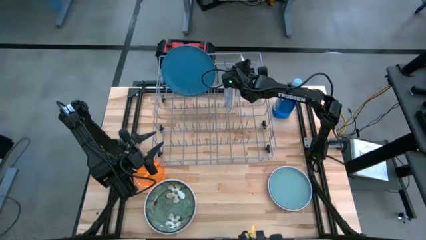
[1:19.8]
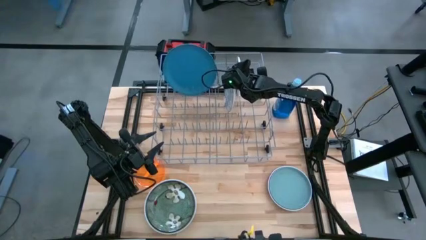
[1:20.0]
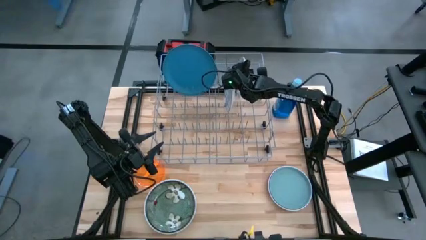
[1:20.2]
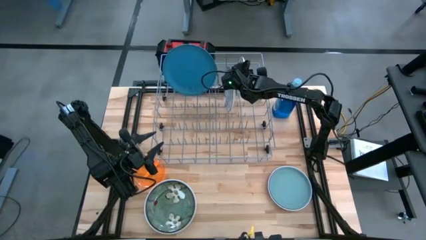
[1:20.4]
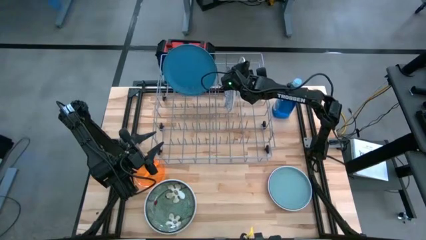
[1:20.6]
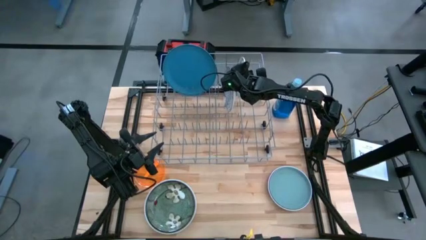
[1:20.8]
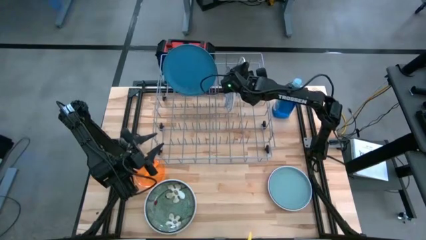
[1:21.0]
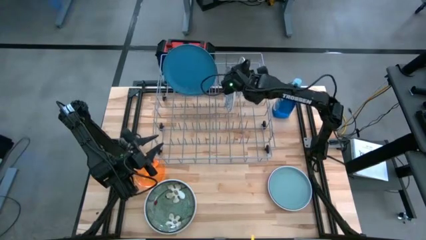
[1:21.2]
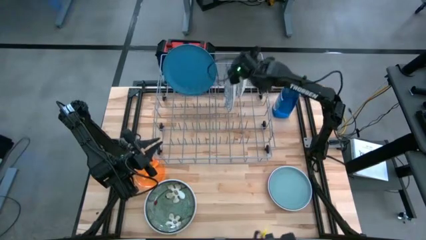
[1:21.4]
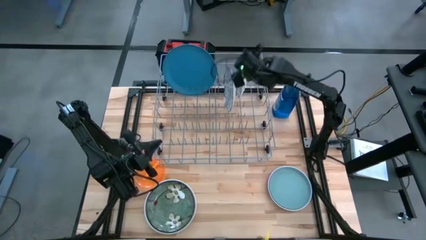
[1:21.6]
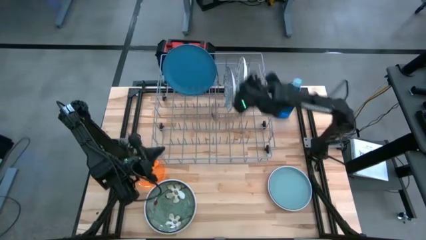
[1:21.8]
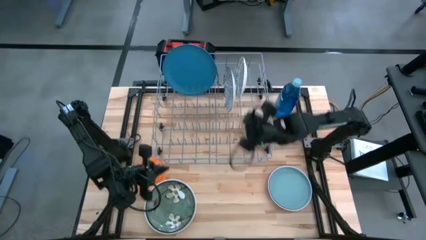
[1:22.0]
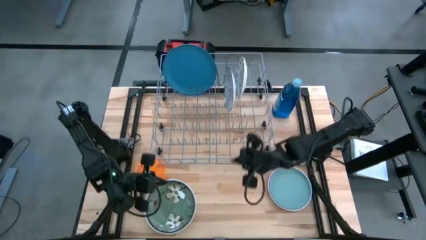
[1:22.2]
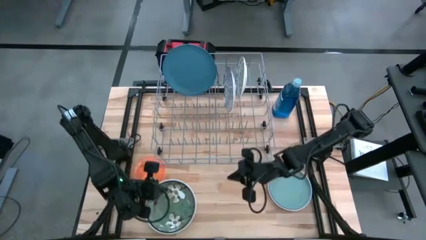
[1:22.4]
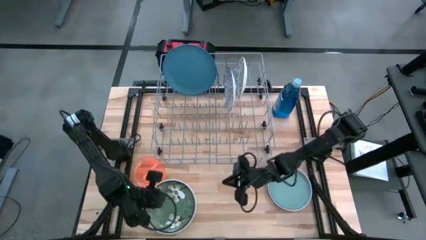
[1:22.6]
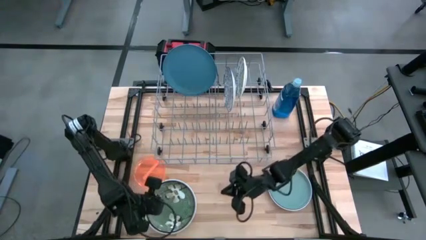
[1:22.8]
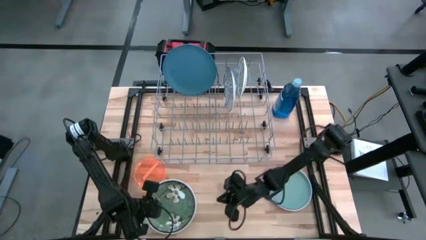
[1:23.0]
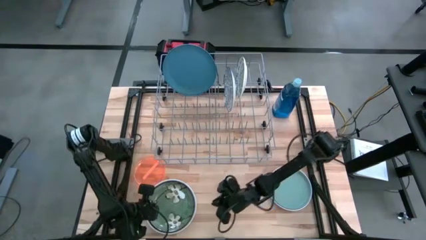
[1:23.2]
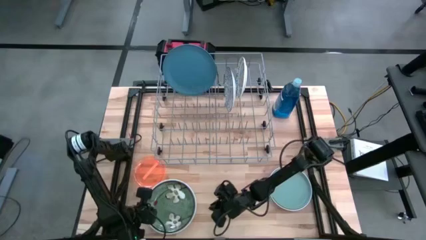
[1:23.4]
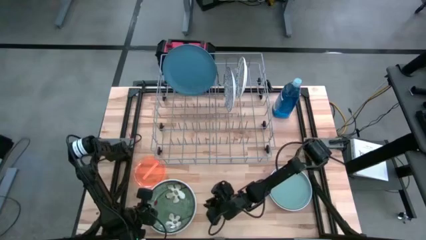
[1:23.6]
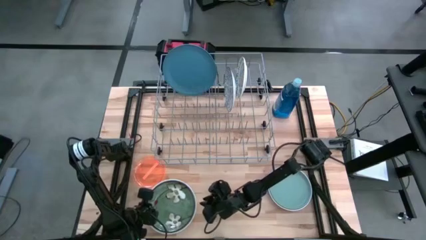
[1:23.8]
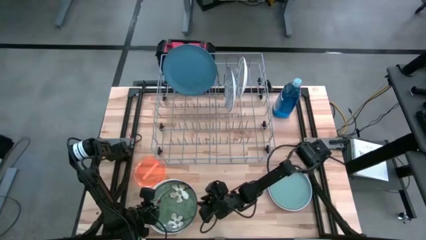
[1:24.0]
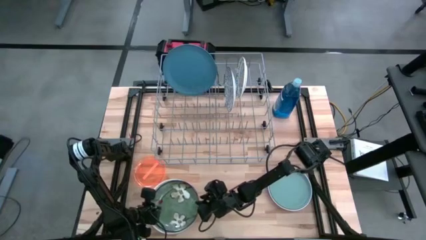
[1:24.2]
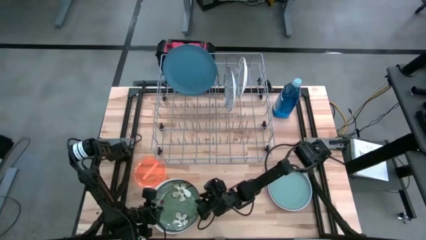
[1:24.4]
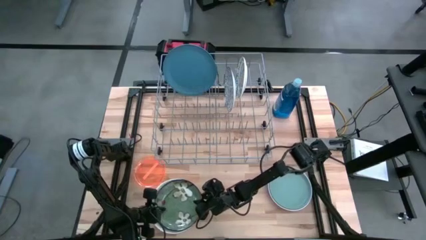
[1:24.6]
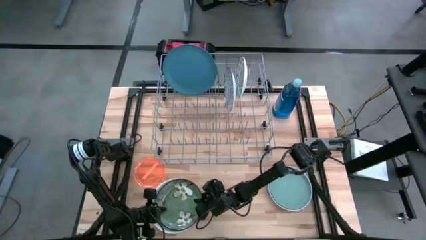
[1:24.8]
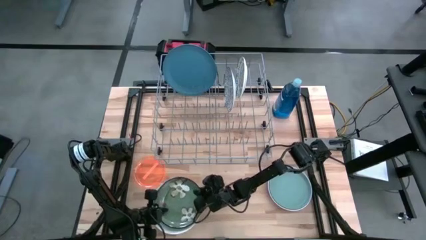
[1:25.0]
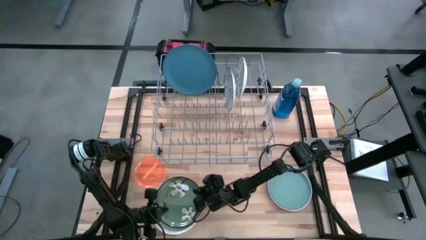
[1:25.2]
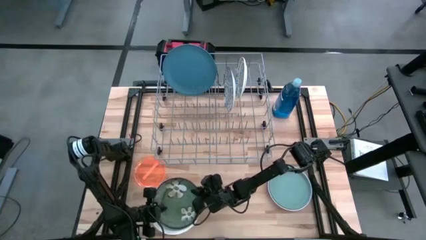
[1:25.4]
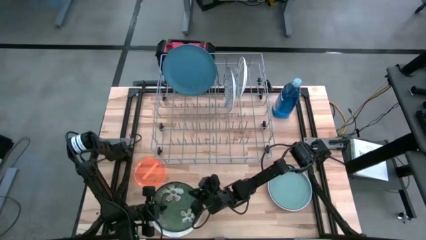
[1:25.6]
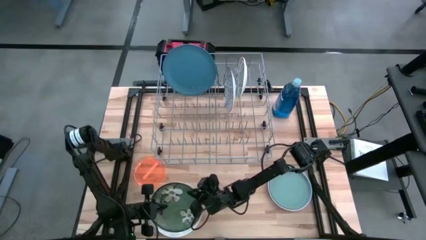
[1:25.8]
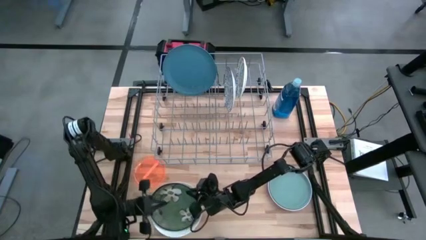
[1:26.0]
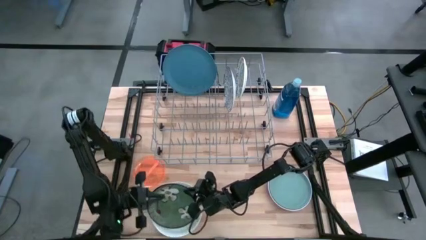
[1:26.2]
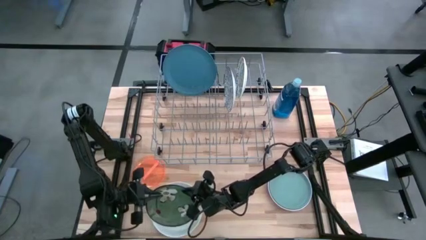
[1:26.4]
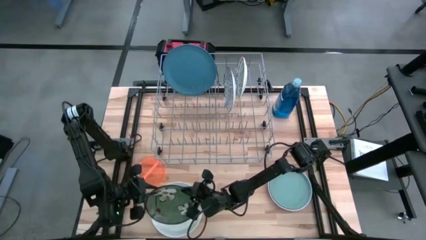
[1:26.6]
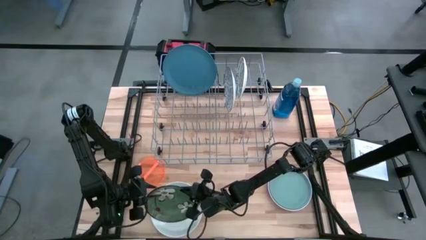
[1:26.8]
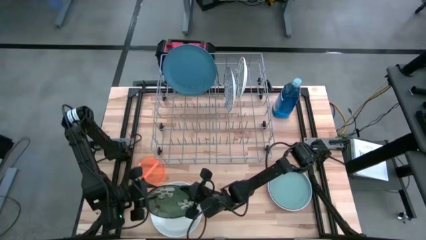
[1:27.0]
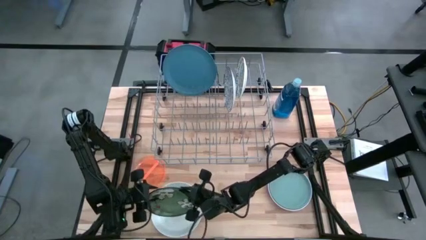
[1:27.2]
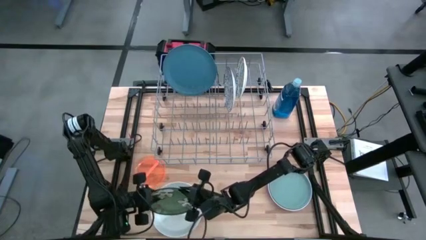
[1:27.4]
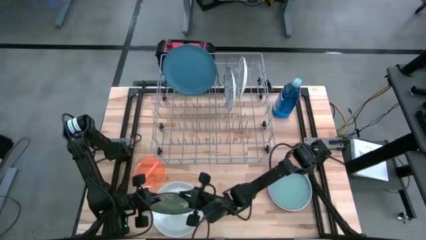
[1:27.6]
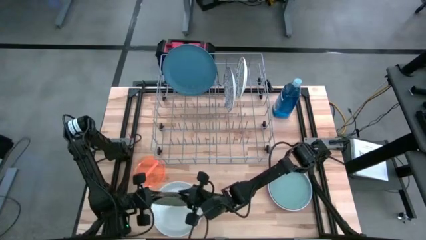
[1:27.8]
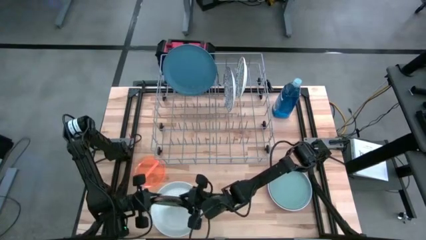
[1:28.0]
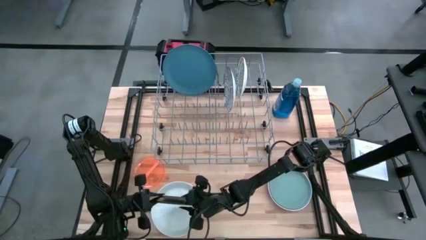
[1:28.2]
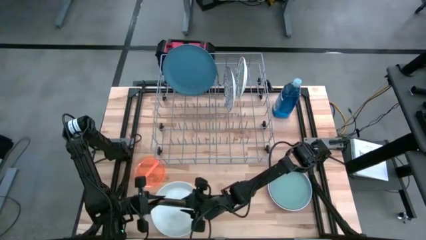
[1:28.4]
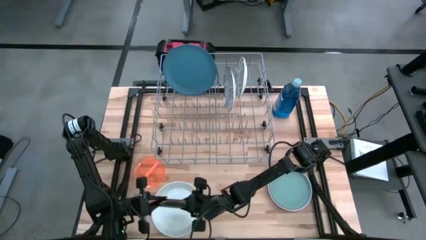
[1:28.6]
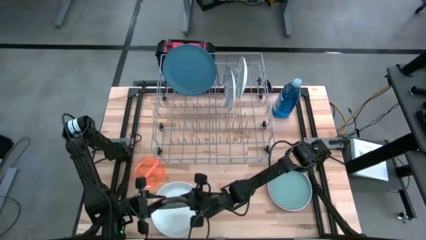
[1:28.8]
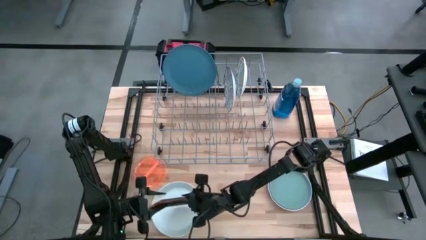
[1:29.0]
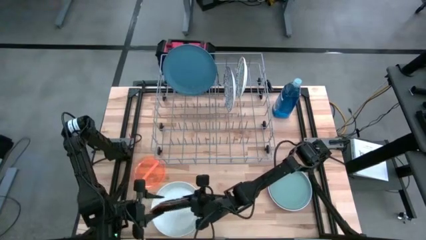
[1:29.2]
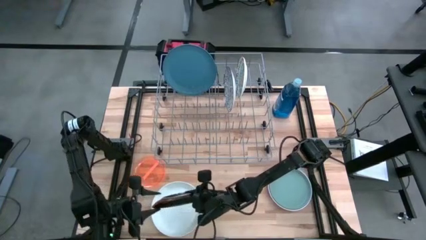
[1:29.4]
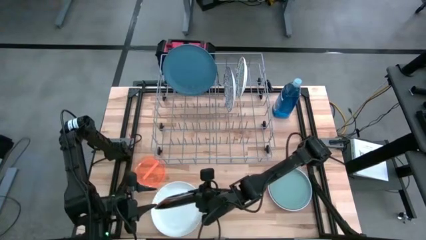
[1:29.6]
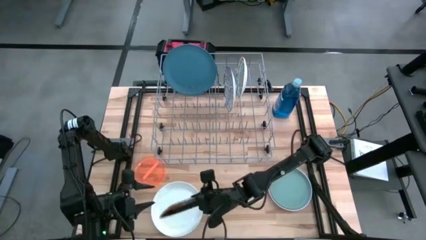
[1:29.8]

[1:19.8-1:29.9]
Task: Sort dishes
Put the green plate in the dish rack

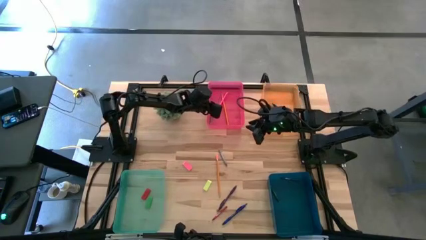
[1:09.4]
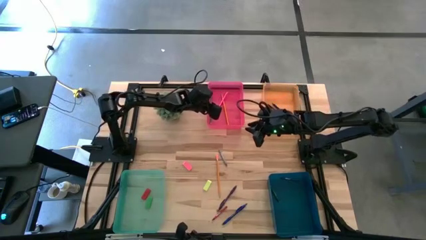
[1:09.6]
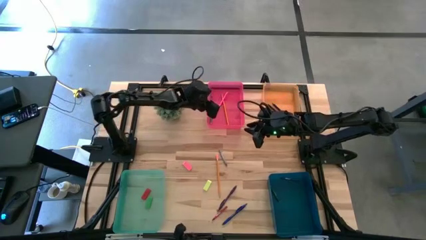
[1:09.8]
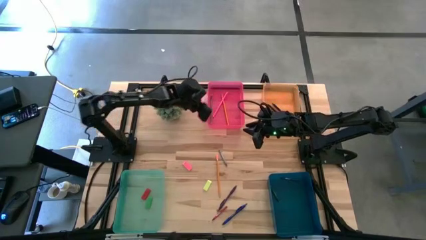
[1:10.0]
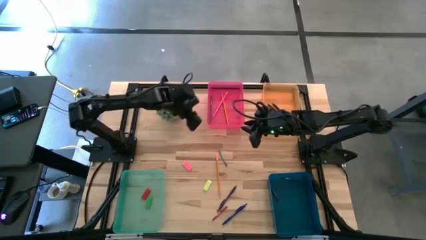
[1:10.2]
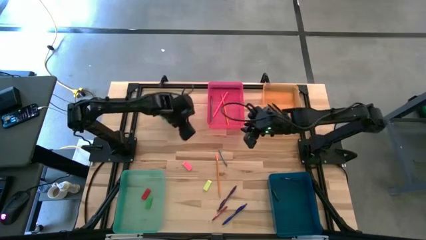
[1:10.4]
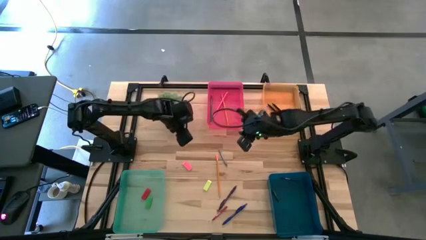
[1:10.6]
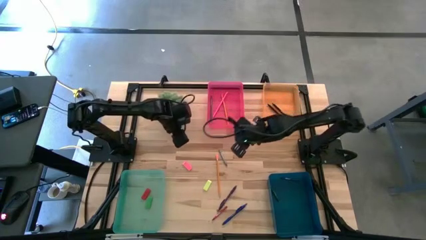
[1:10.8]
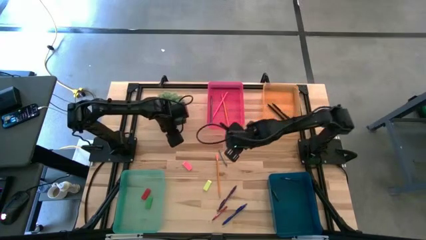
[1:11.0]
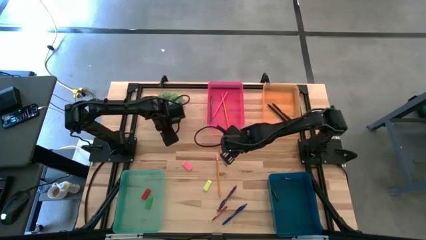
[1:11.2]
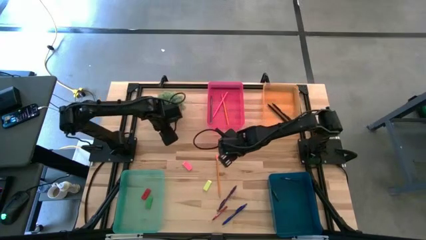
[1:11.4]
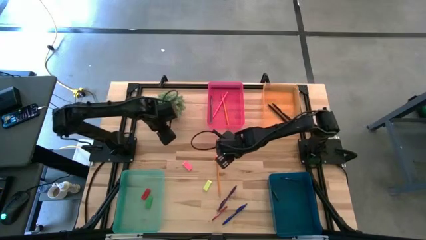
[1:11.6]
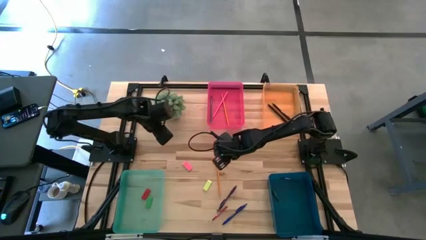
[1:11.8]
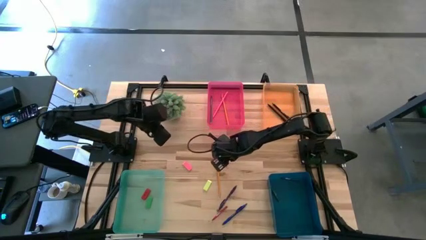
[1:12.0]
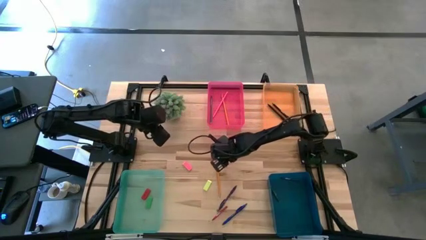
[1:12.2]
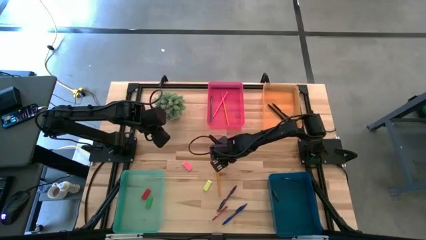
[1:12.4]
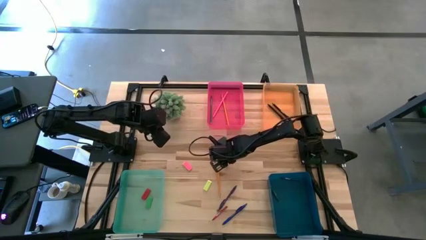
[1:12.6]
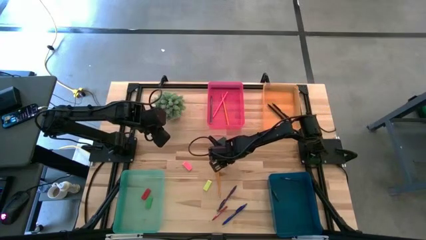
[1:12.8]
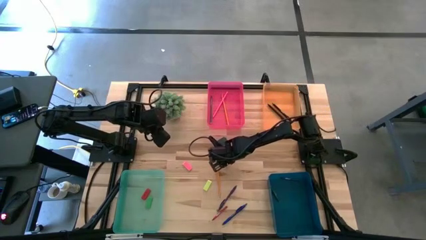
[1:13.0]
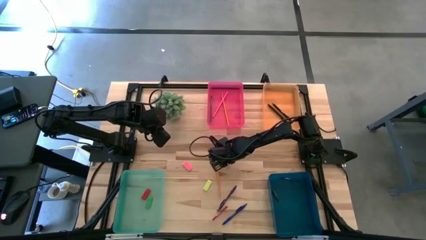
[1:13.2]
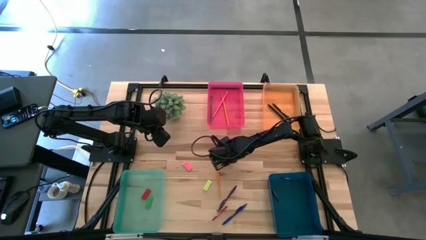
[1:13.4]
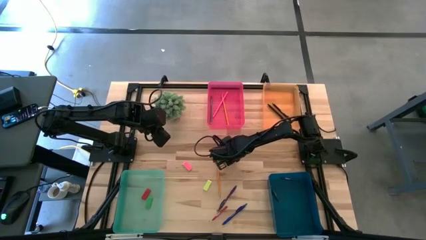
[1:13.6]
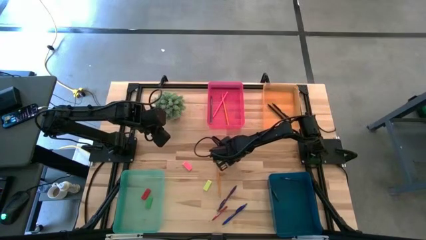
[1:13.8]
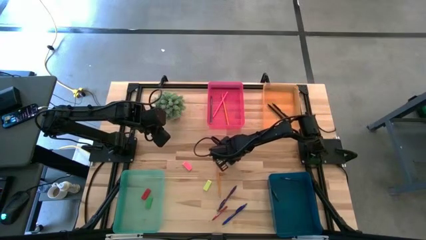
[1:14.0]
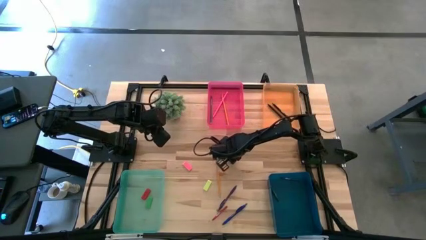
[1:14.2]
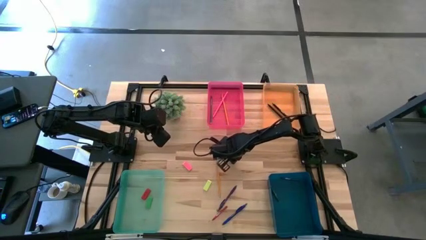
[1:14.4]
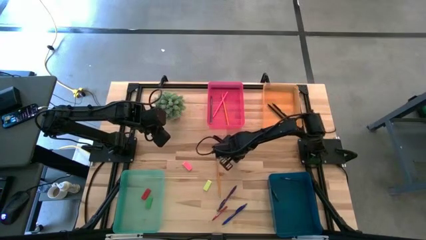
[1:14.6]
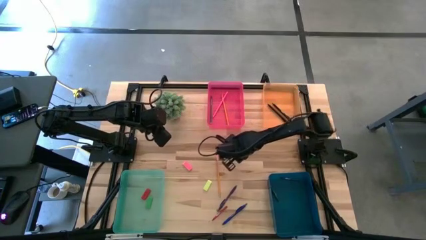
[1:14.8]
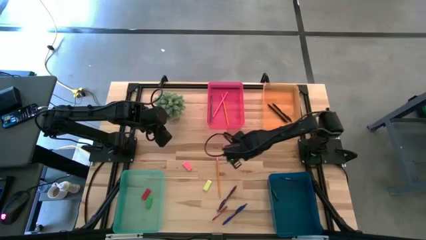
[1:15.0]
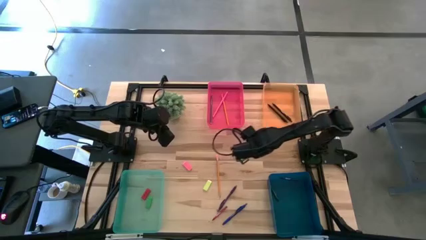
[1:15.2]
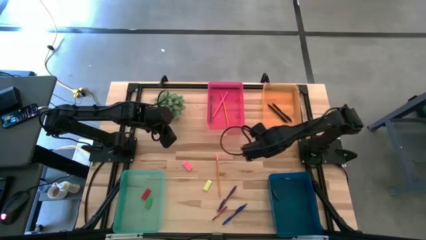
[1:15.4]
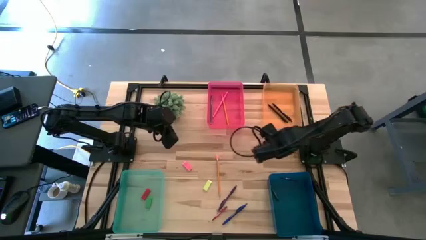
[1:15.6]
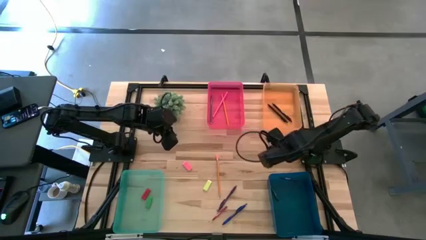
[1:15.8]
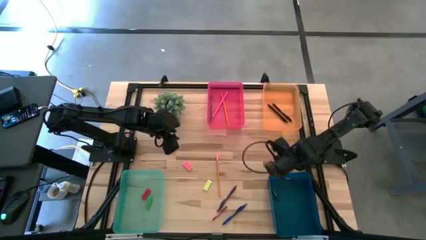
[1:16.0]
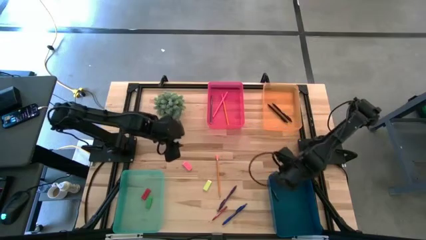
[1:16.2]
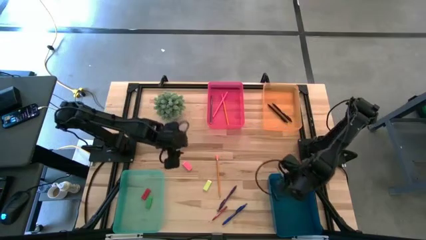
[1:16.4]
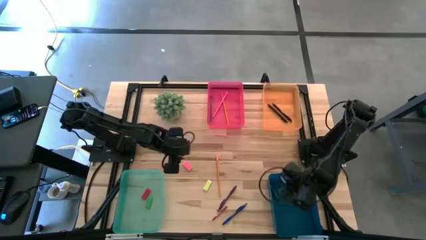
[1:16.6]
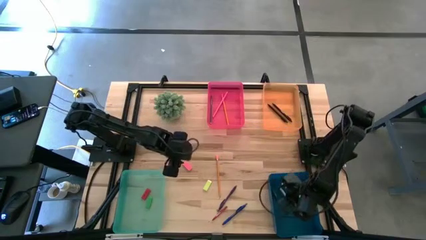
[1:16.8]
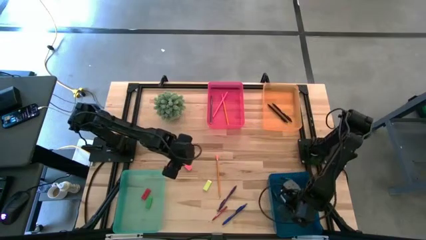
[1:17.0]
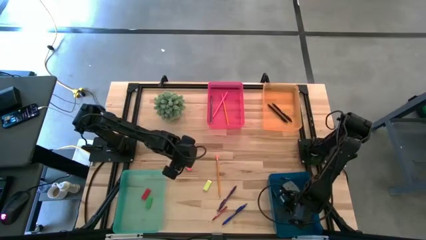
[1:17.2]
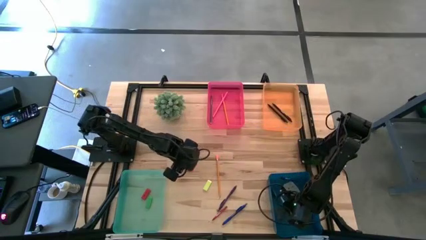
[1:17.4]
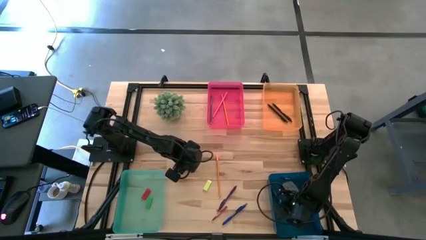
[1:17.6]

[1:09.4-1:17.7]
Task: Sort crayons/erasers/pens/pencils in bins
Put the gray crayon into the blue bin
